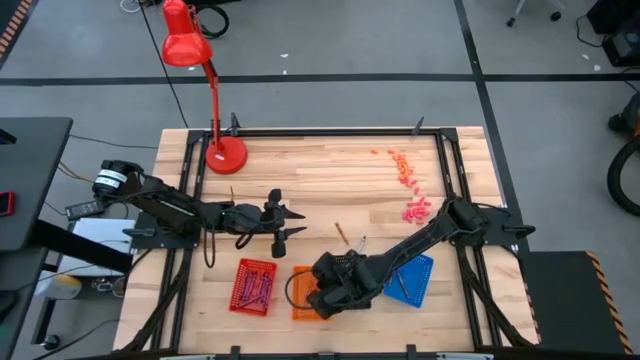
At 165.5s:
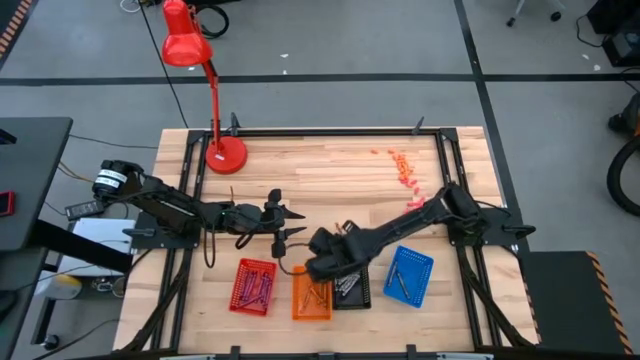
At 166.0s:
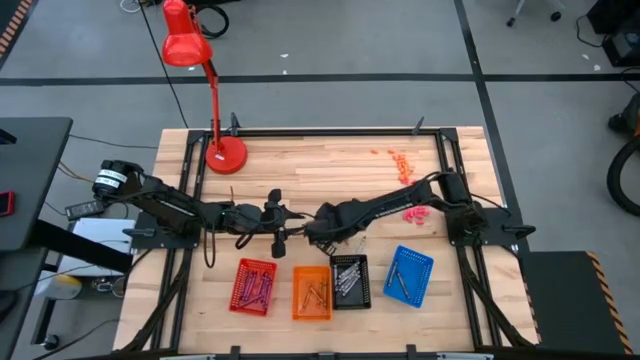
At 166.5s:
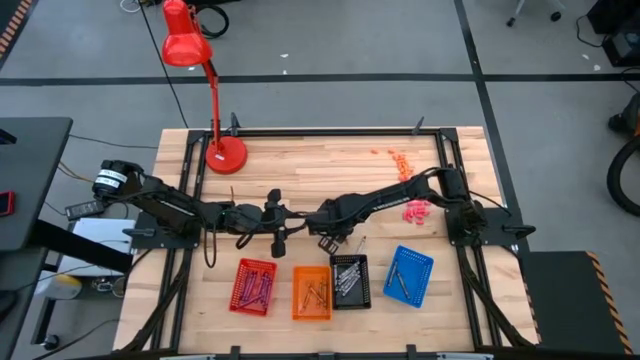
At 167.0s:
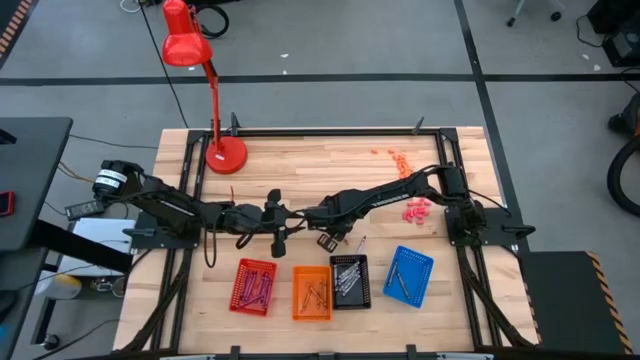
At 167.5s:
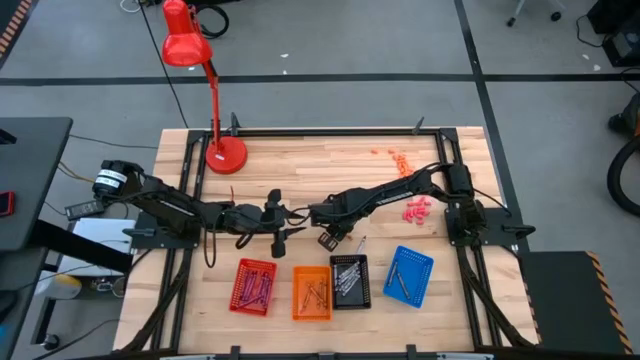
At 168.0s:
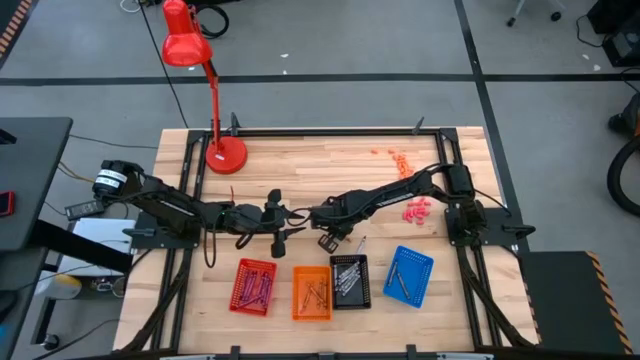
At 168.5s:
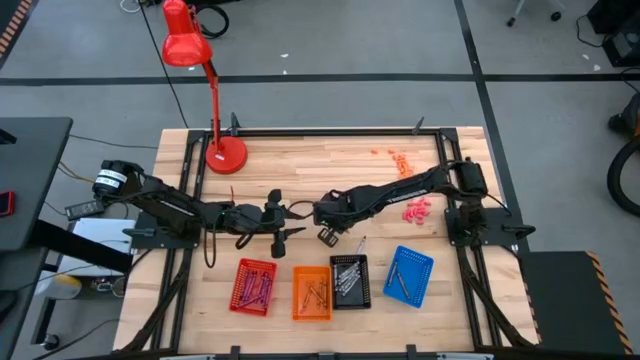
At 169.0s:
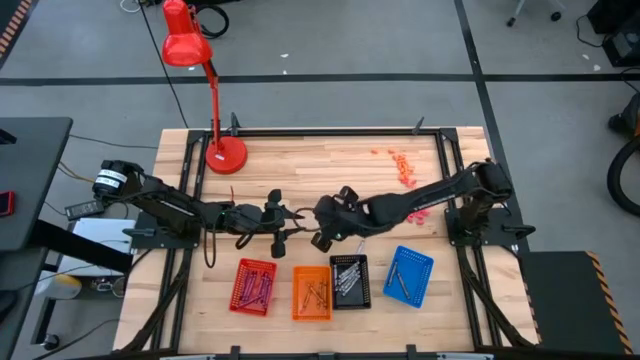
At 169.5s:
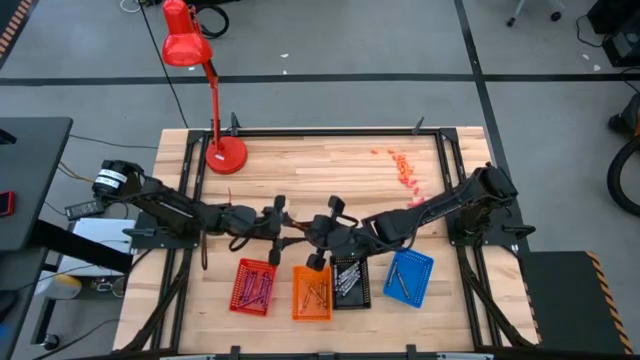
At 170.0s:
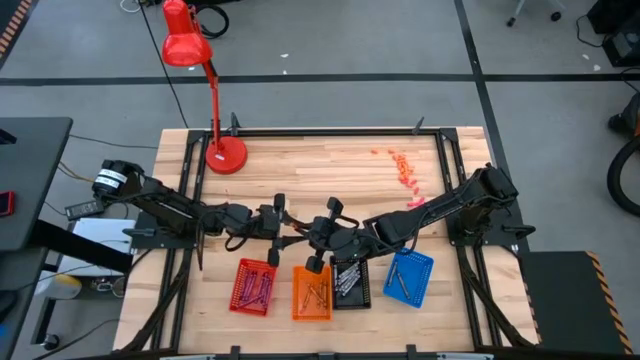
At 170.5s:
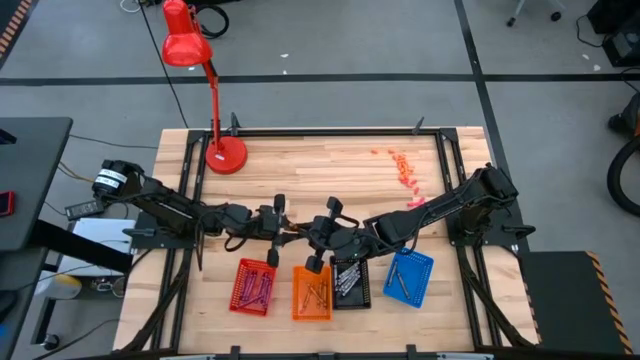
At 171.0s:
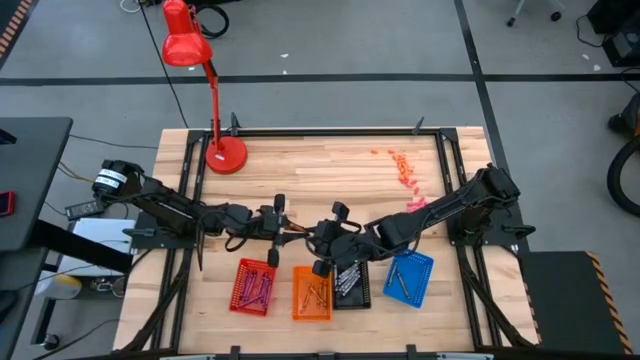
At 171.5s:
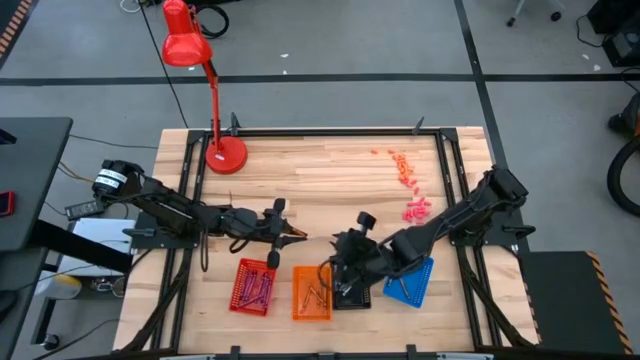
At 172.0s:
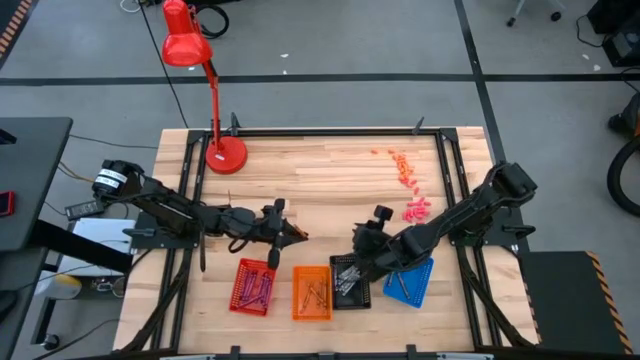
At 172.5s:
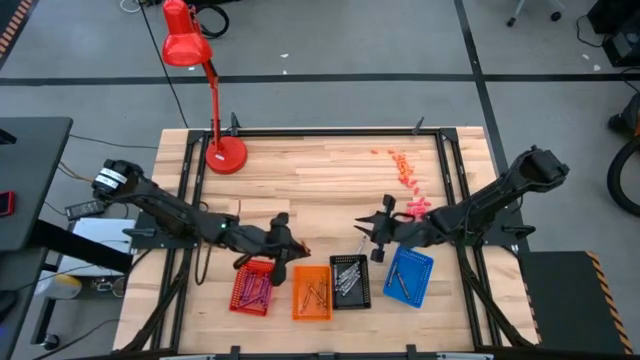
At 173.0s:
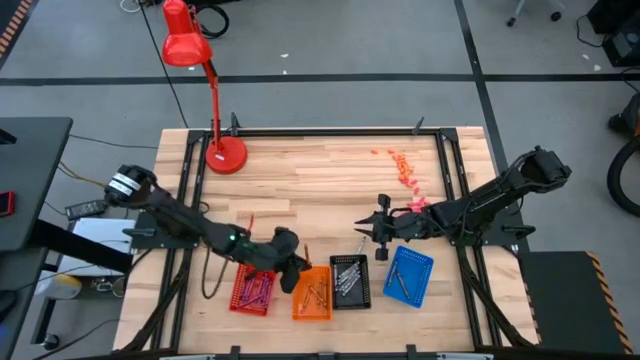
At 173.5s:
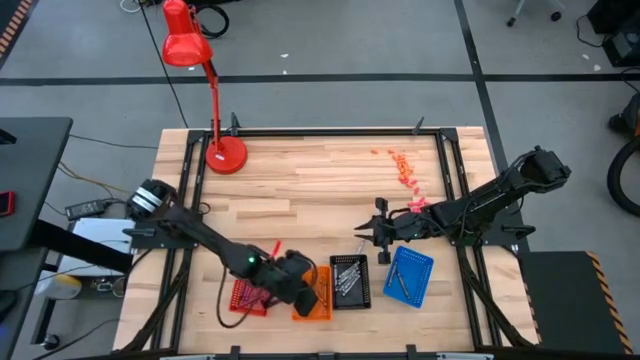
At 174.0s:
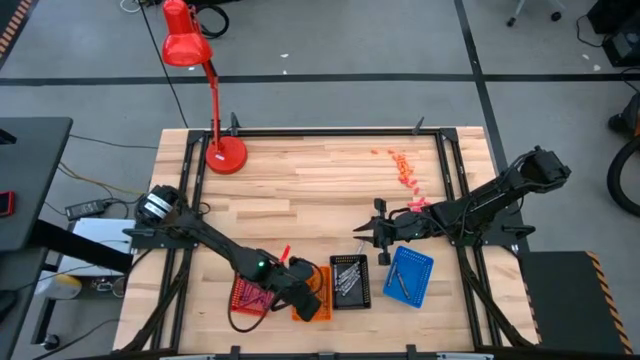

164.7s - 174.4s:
Task: Sort crayons
Put the orange crayon into the orange bin

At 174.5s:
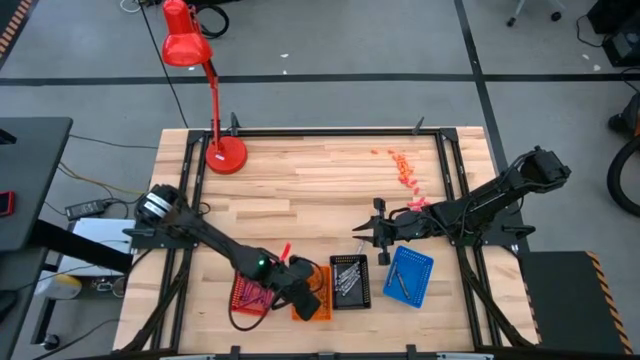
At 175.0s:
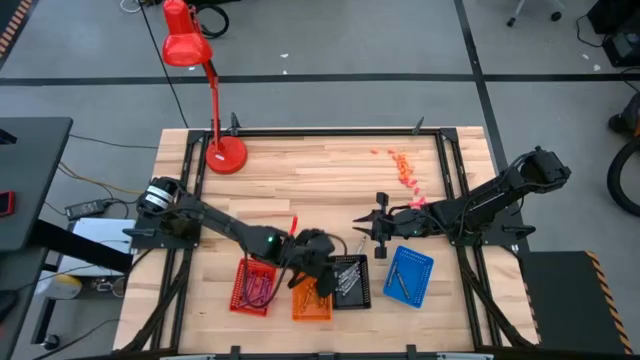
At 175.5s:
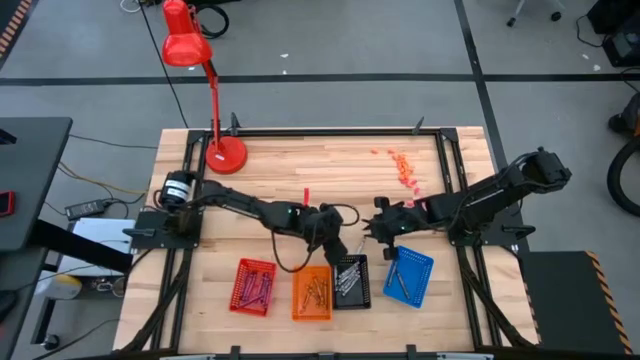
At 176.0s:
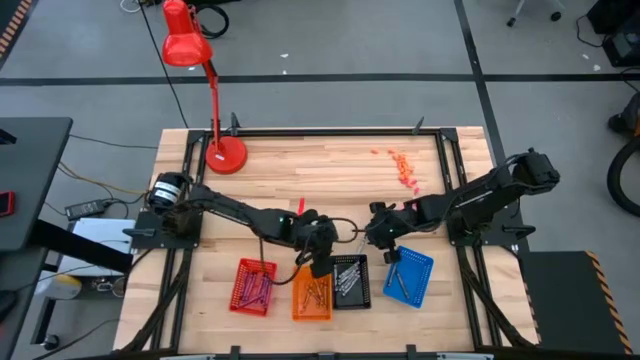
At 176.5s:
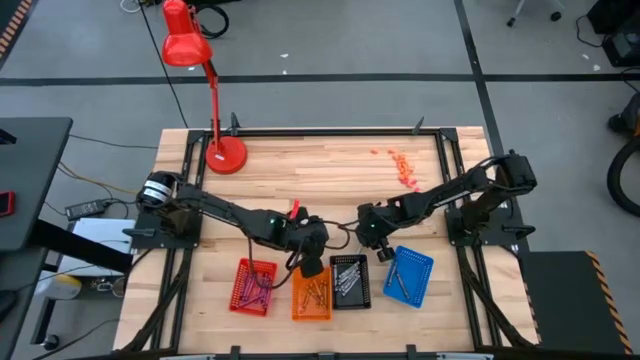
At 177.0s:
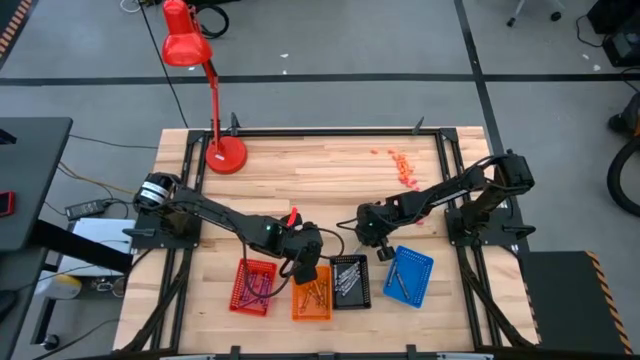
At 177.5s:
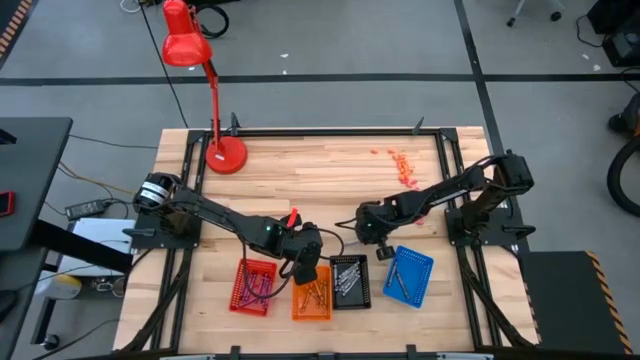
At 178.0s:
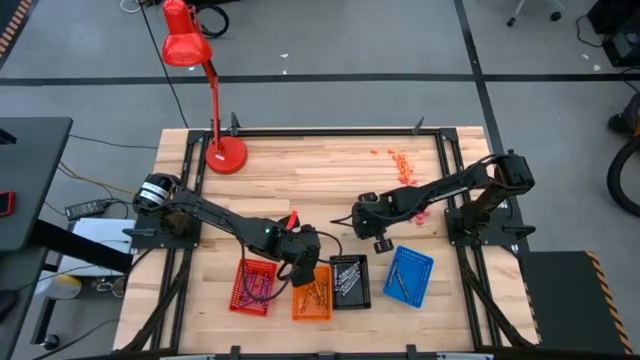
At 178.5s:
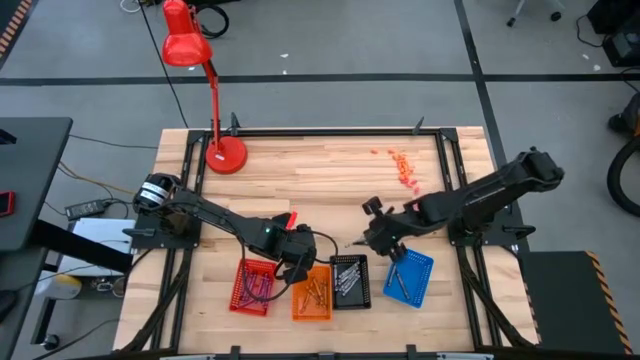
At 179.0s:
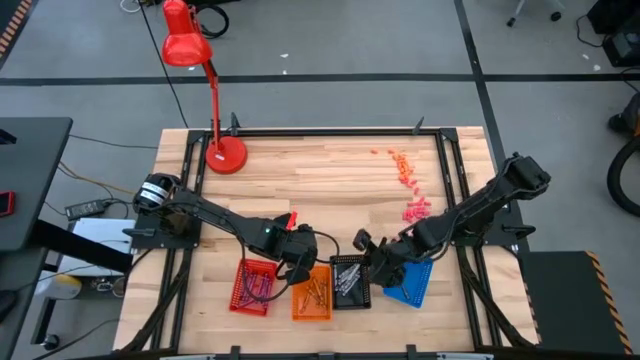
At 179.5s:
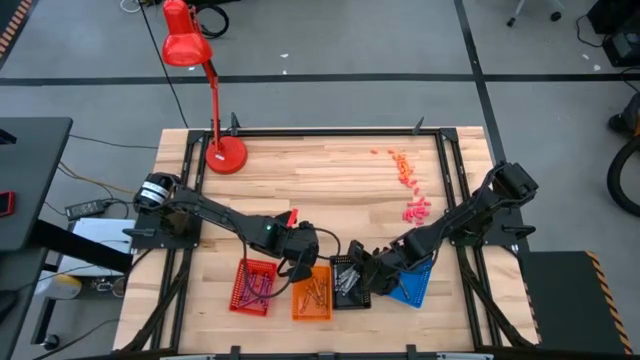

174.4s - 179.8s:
Put the black crayon into the black bin

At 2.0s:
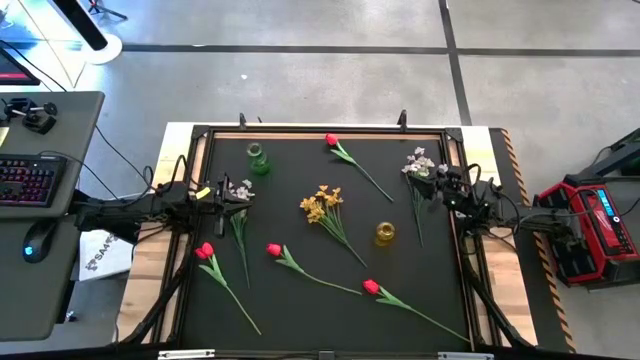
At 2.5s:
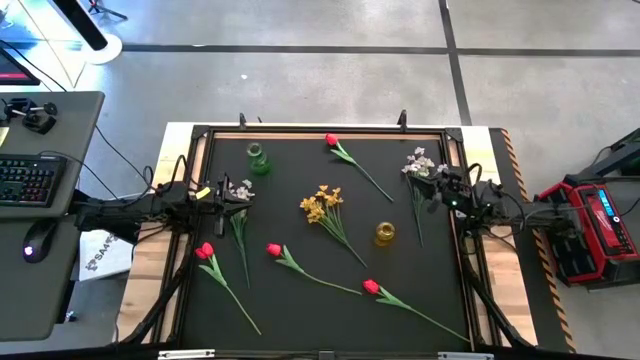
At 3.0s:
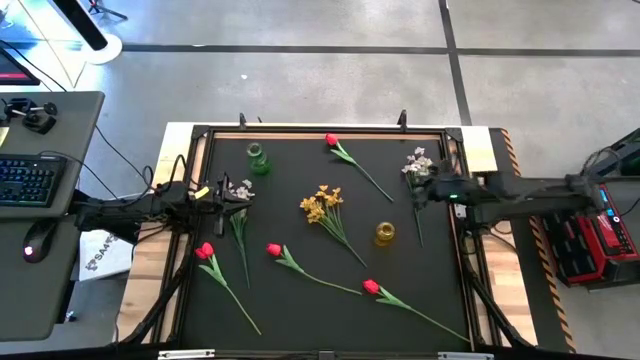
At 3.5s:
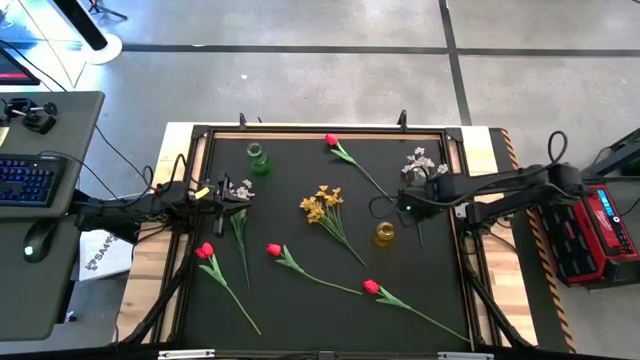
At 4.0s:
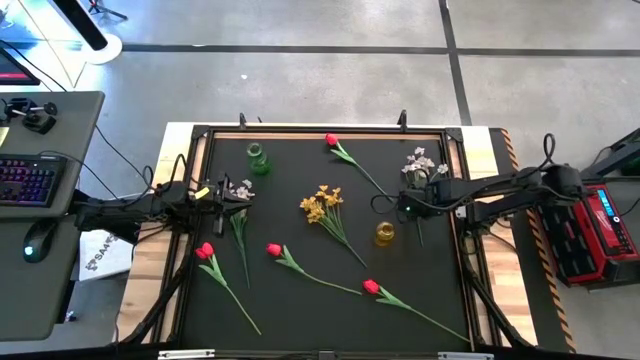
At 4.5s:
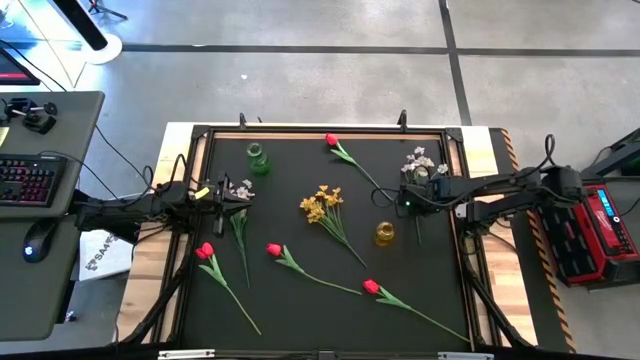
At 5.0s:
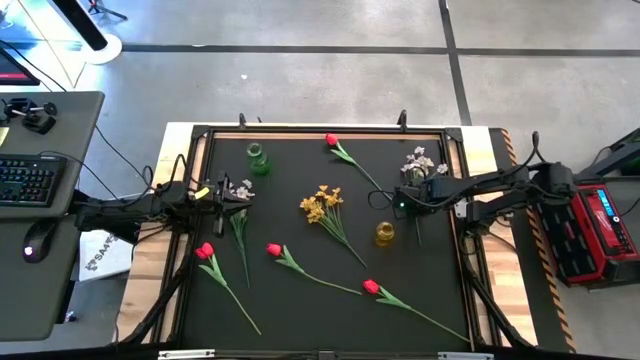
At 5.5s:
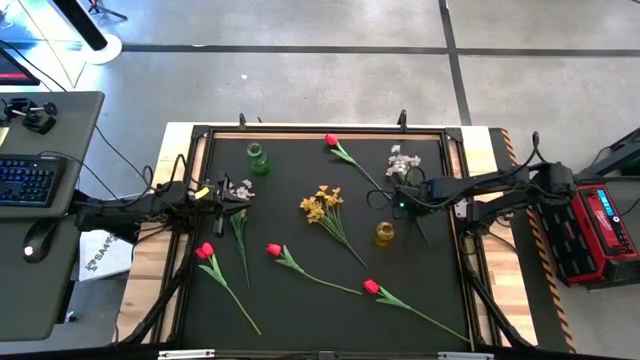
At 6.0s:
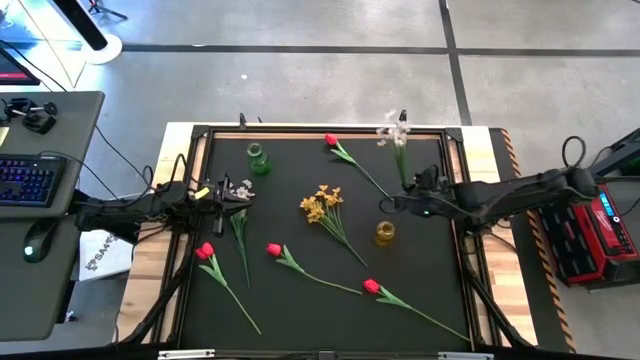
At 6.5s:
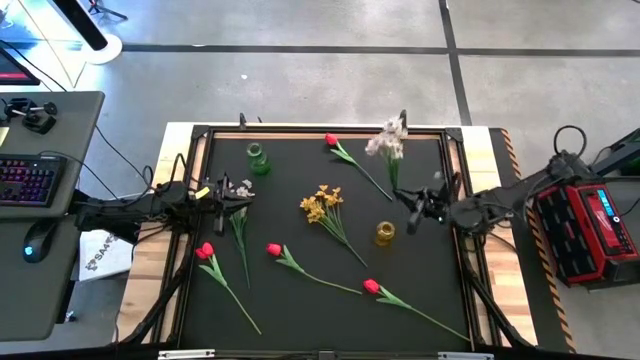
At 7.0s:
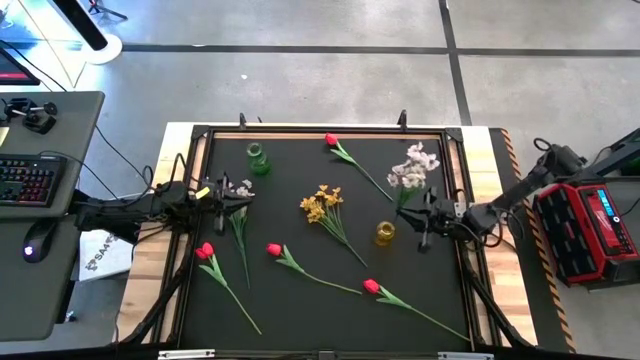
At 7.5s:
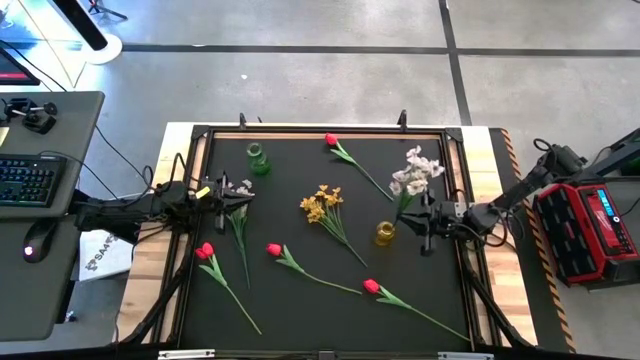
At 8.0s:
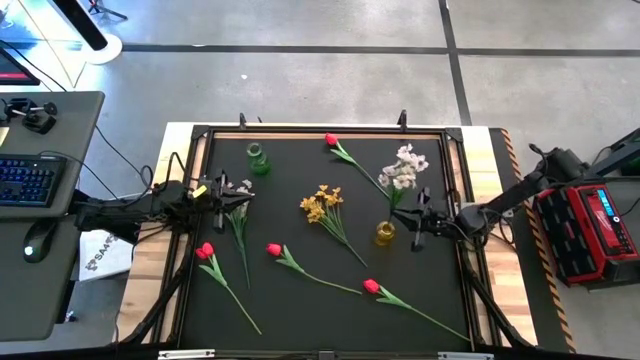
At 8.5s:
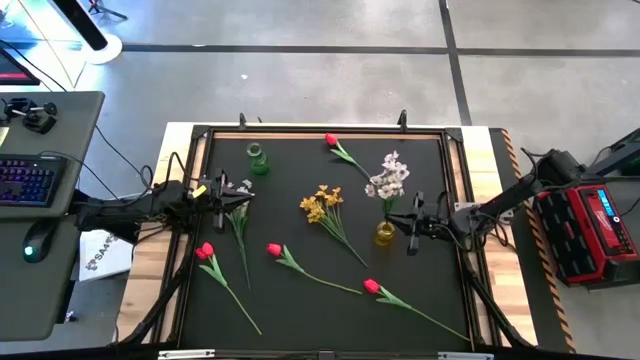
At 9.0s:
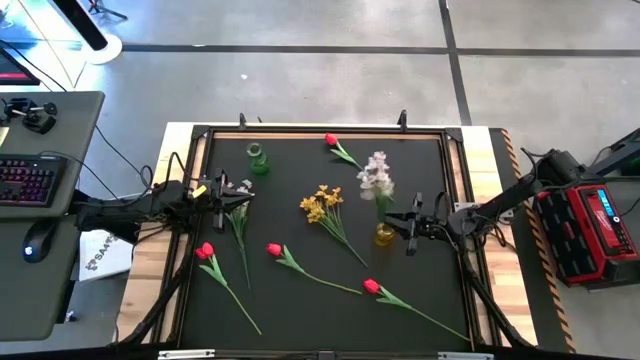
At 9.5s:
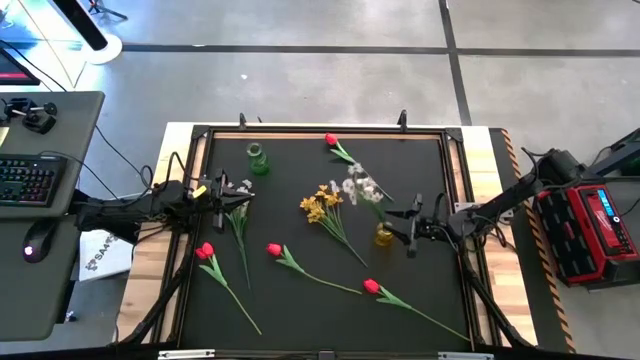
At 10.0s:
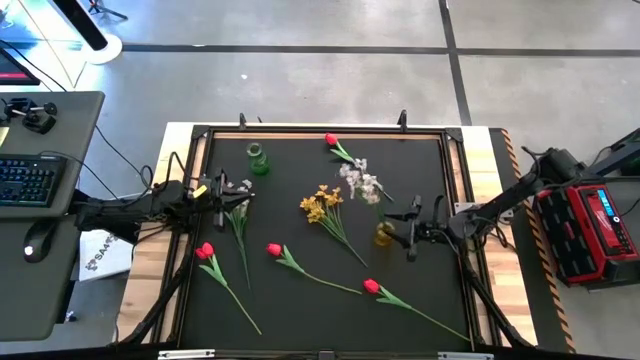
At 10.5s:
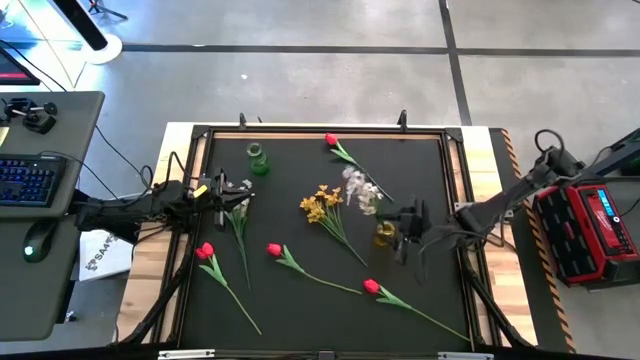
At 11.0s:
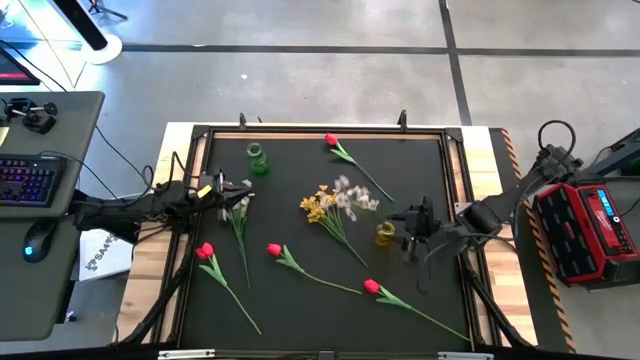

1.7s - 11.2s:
Task: Sort flowers into vase by color
Put the right white flowers in the yellow vase
